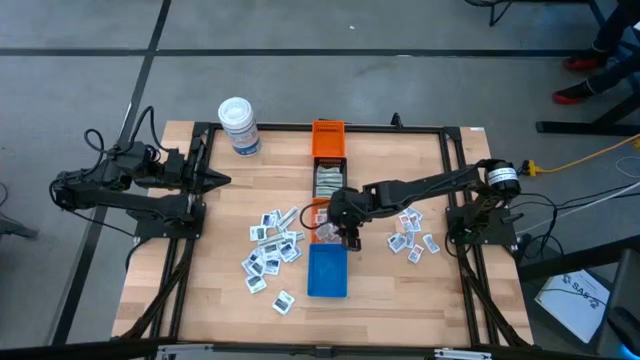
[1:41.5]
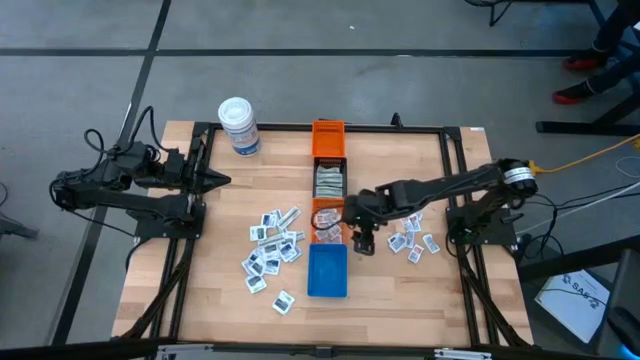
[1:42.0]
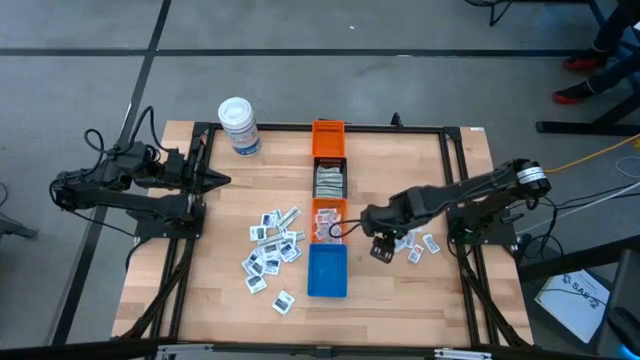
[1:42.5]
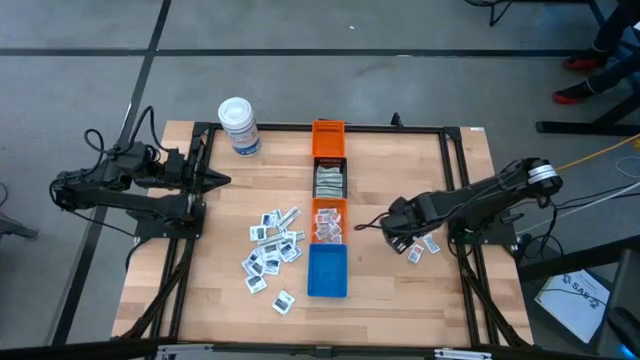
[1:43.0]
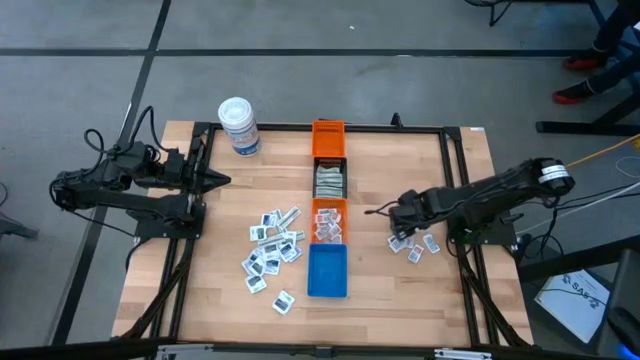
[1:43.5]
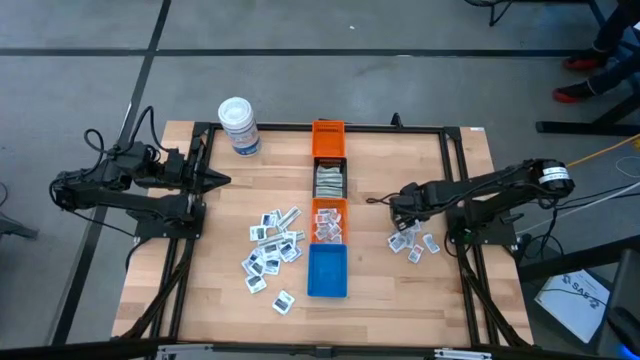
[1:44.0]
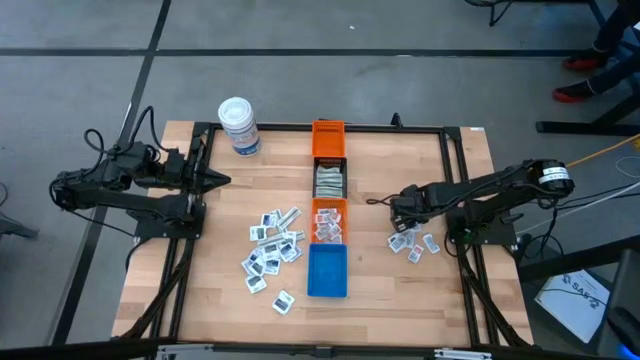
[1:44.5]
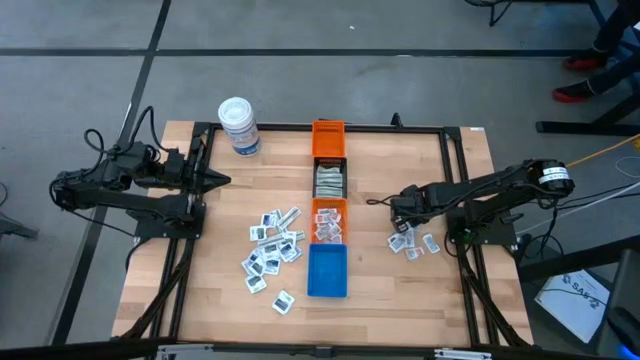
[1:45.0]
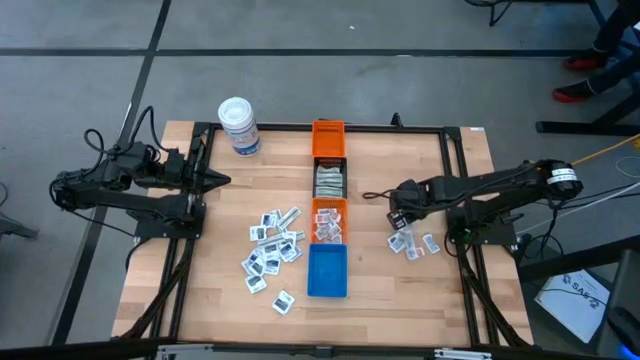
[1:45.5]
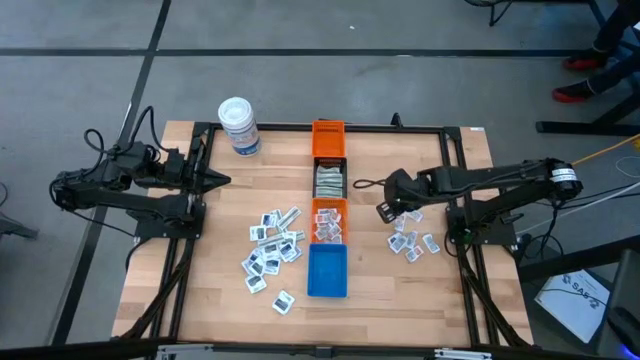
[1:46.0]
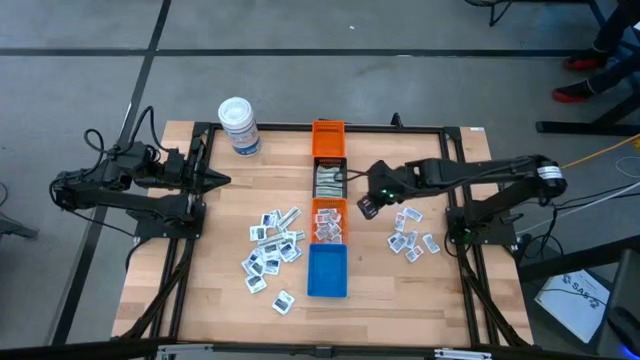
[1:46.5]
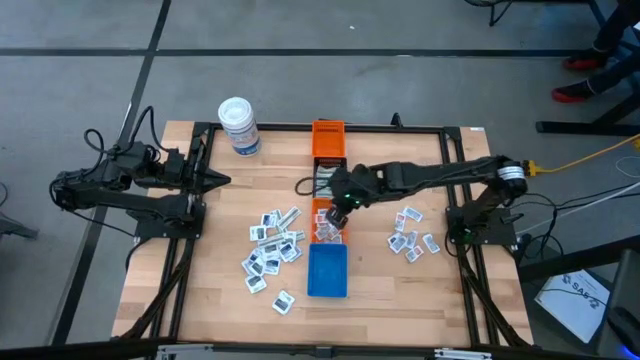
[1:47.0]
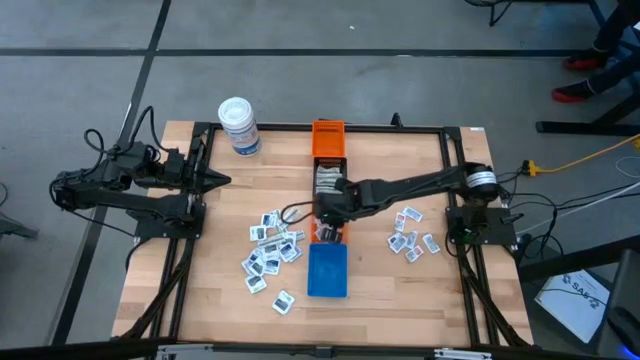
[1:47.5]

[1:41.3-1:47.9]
Task: Pick & Place First Aid Supplies
Put the orange ointment pack into the bottom orange bin

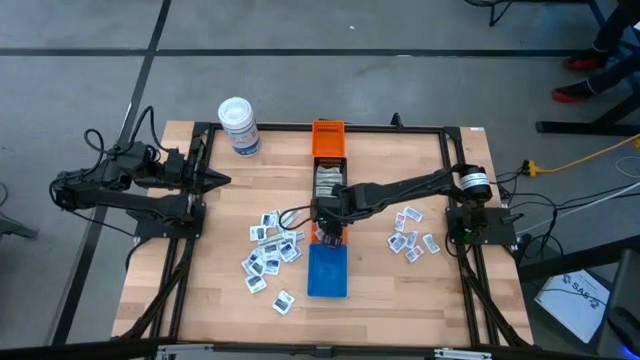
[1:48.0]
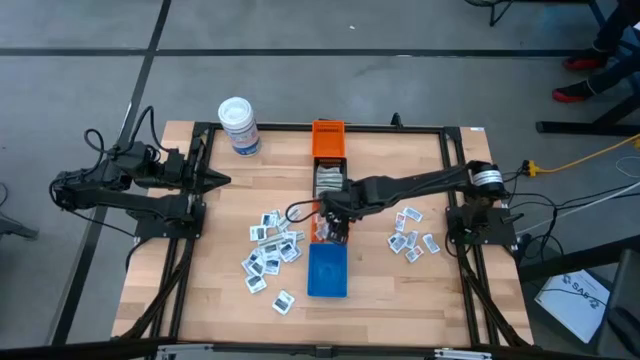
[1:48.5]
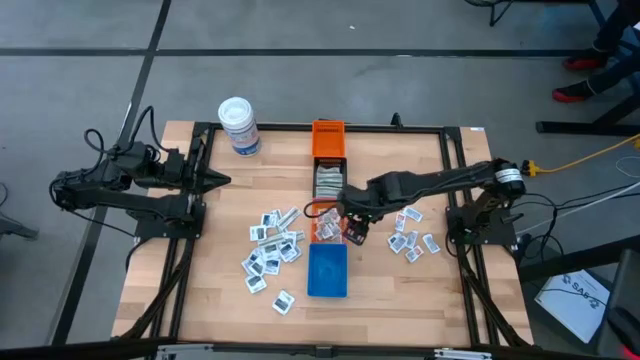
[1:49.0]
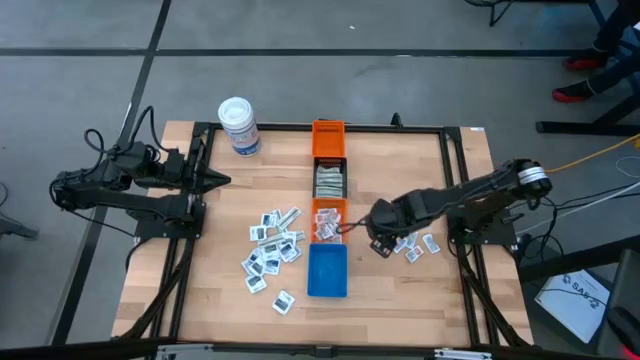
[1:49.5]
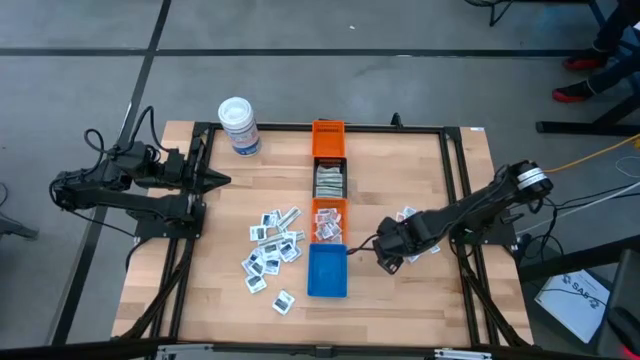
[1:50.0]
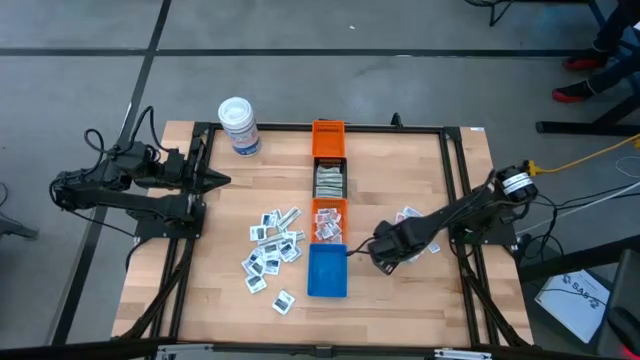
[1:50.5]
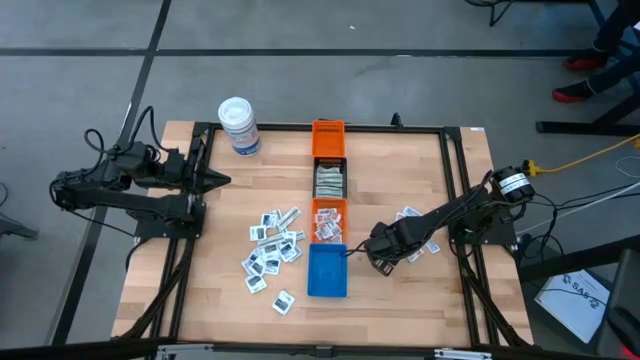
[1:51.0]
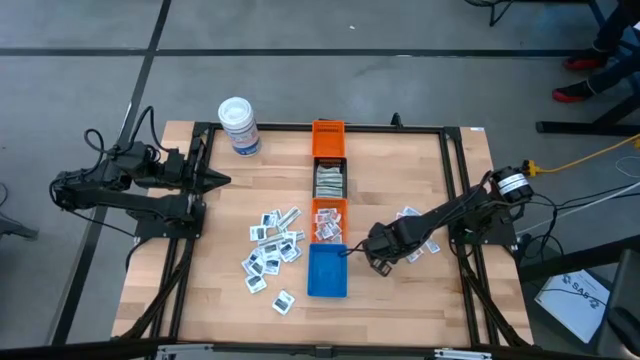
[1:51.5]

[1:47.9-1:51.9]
Put the orange ointment pack into the bottom orange bin

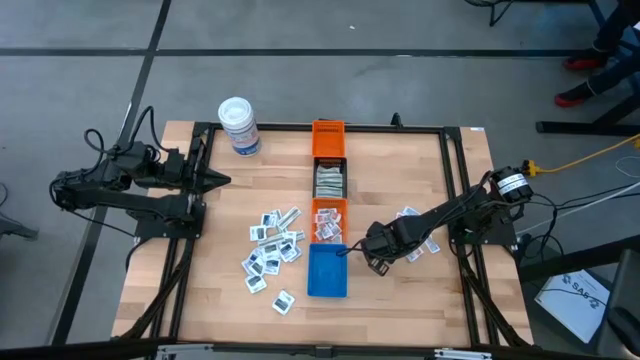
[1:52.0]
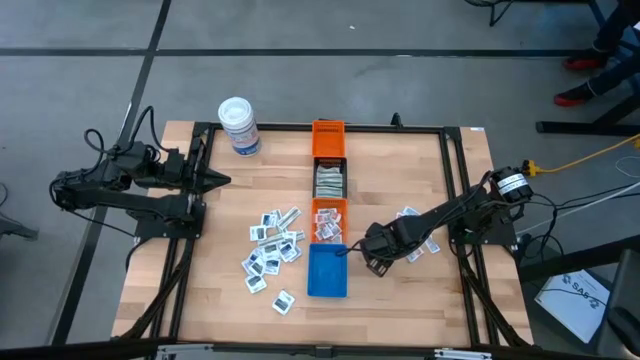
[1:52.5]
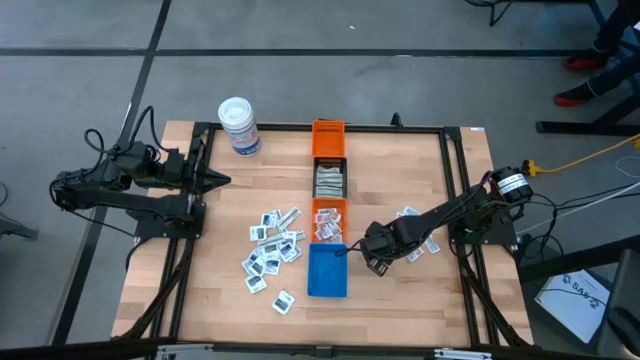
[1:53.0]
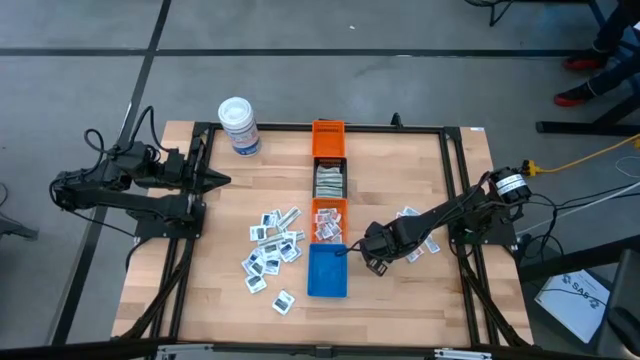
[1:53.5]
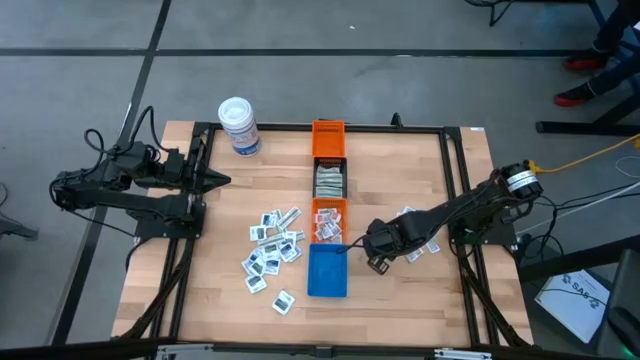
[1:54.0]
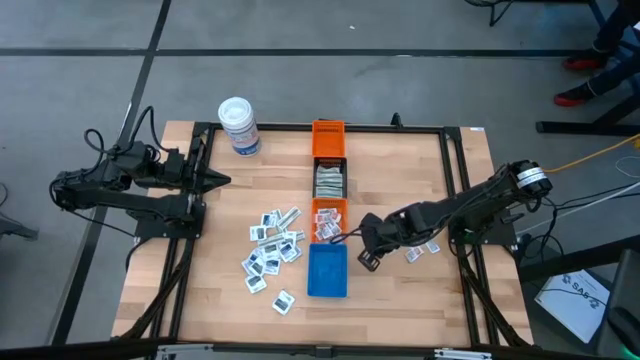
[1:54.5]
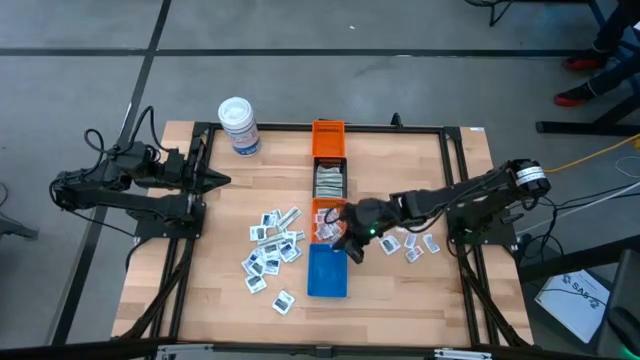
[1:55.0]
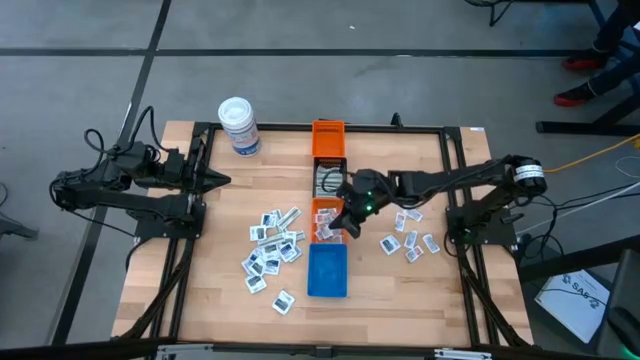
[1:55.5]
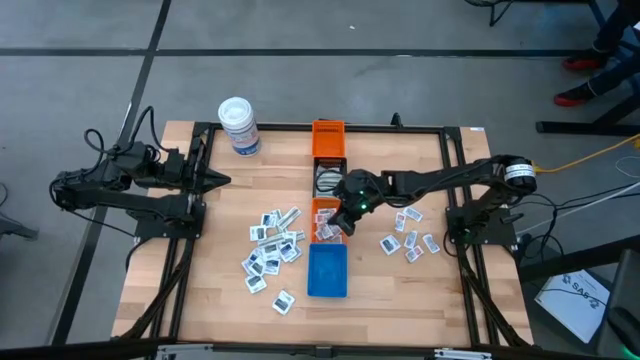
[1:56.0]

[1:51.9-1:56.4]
Put the orange ointment pack into the bottom orange bin

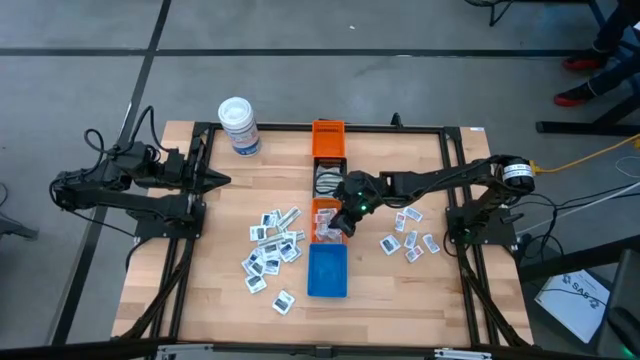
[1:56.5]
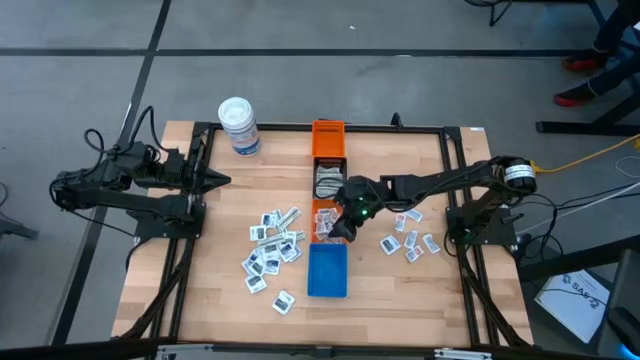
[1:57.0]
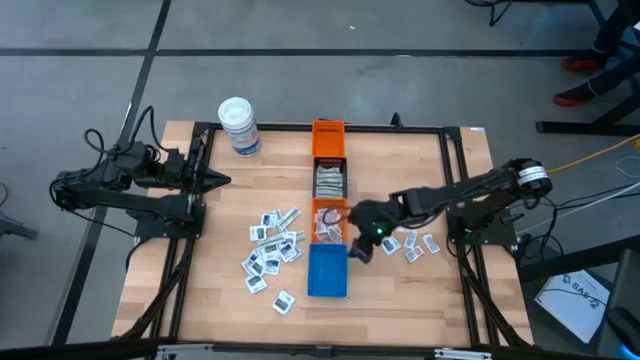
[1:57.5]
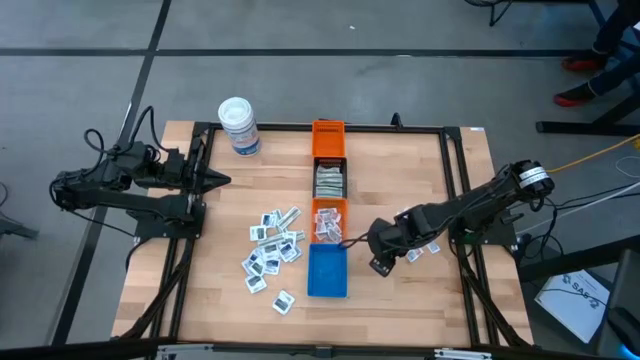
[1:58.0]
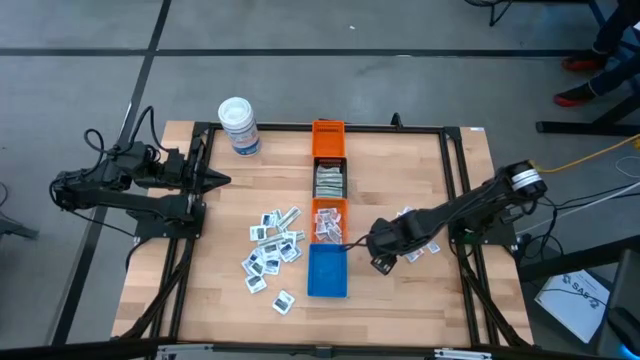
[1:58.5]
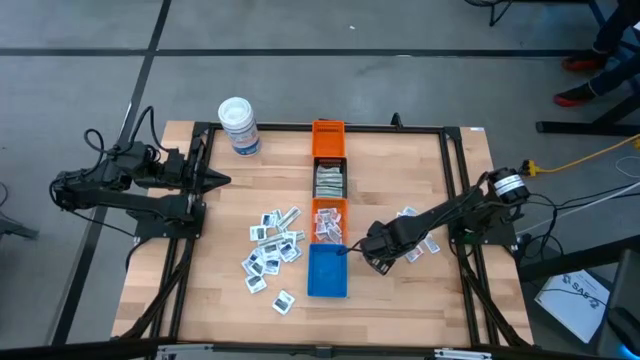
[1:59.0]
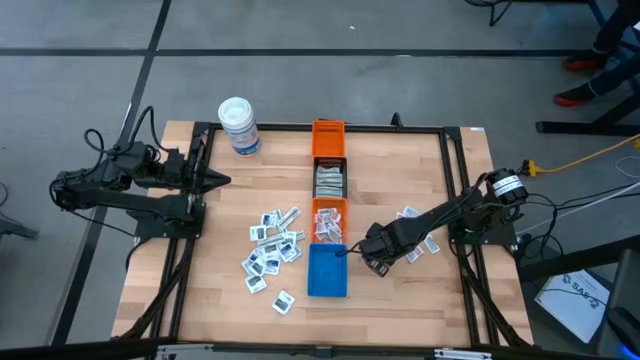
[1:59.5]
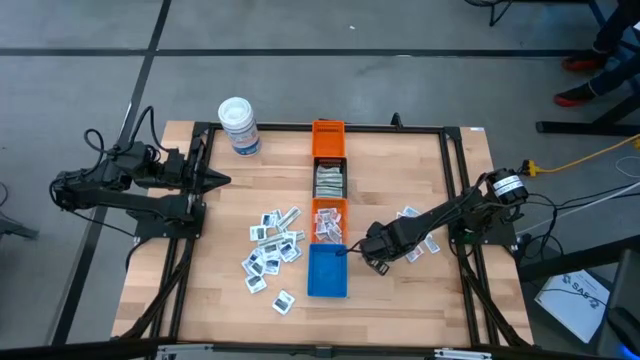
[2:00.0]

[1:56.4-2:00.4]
Put the gray towelette pack into the blue bin

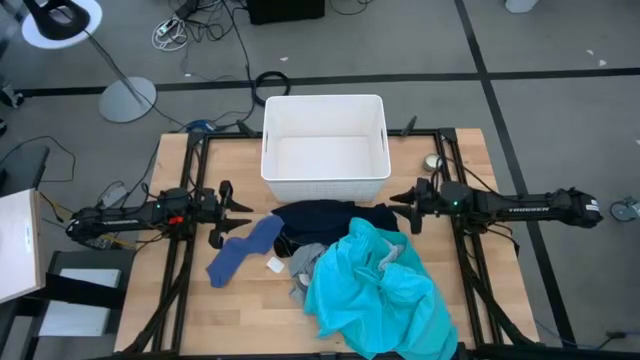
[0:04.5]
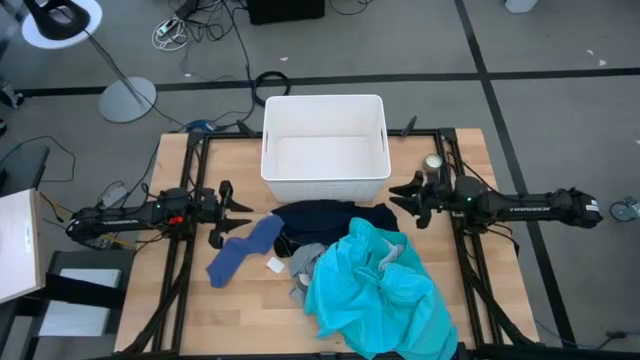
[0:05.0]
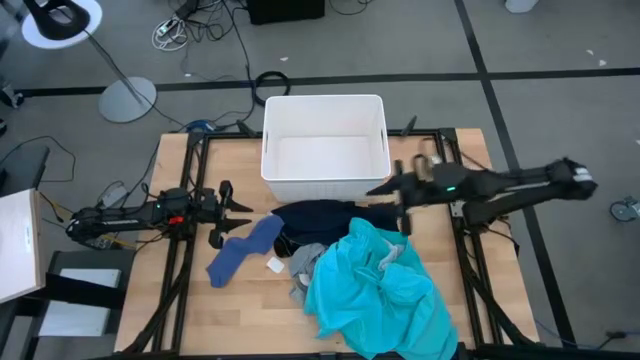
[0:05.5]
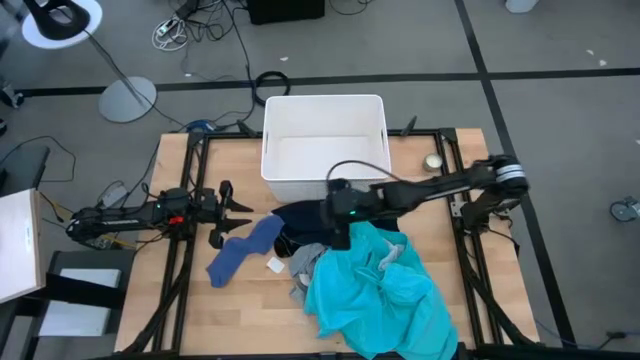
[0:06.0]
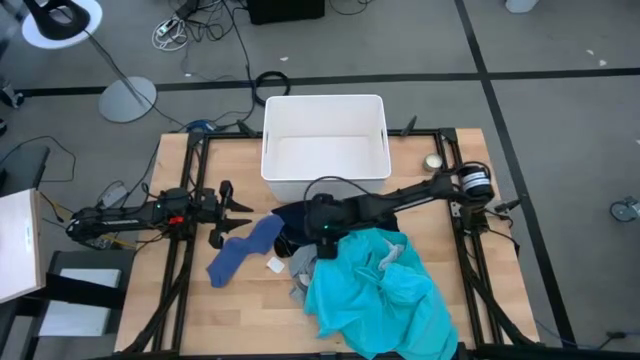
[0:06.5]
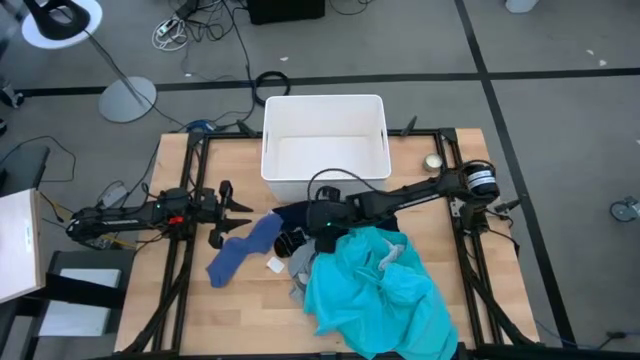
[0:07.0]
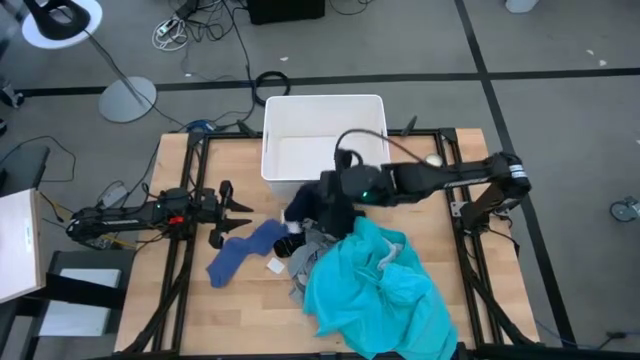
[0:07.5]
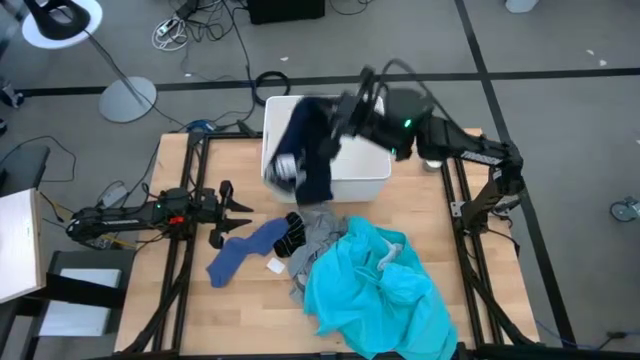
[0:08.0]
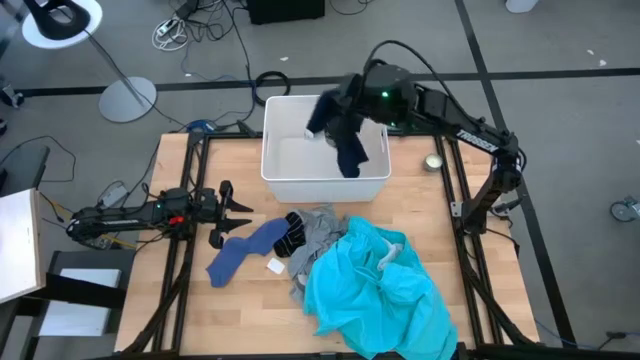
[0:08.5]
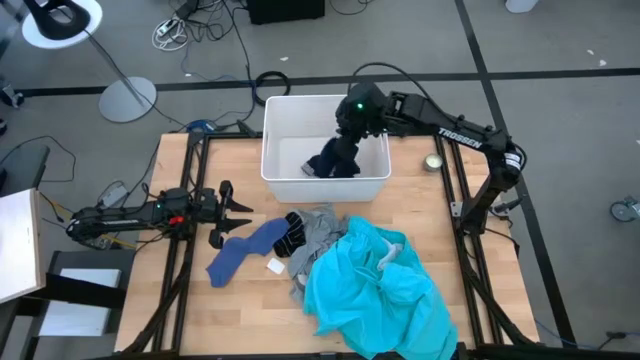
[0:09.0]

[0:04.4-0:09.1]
Task: Sort clothes
Put the black underwear into the white bin
